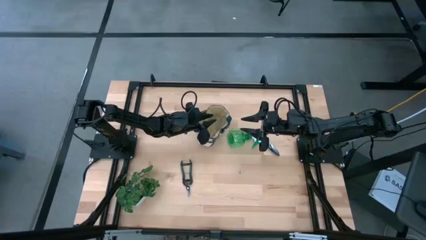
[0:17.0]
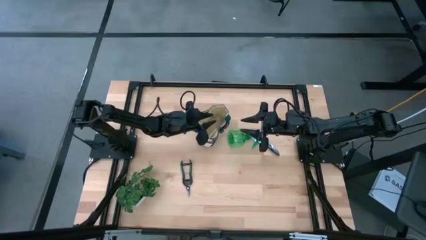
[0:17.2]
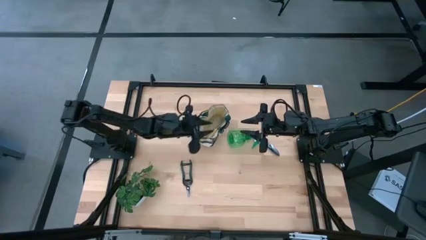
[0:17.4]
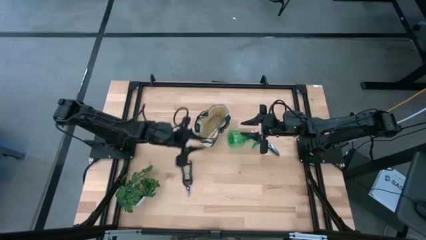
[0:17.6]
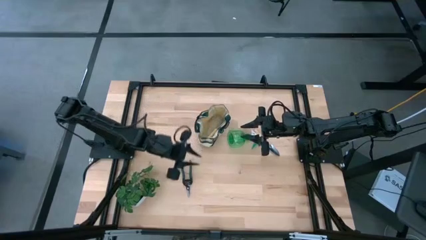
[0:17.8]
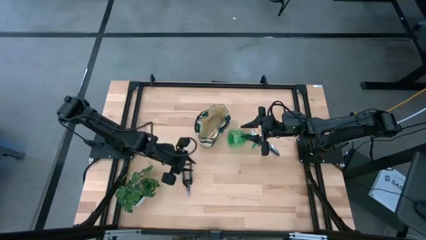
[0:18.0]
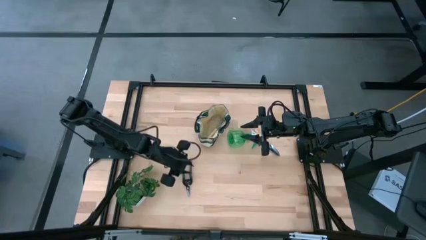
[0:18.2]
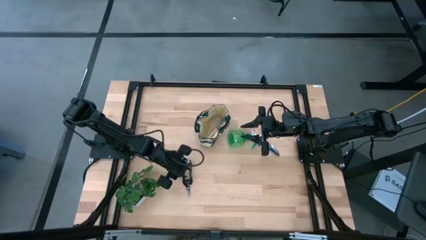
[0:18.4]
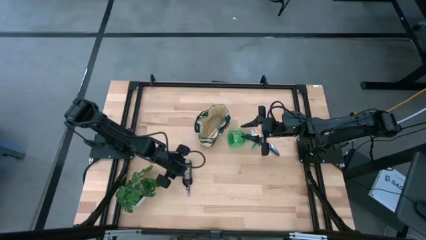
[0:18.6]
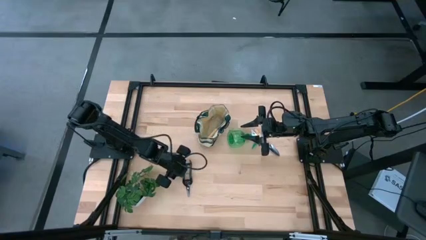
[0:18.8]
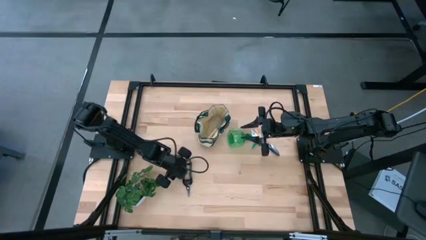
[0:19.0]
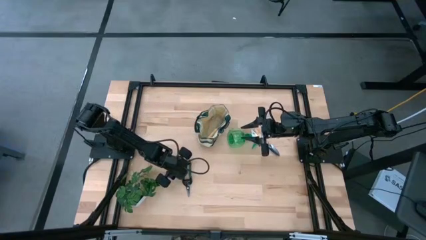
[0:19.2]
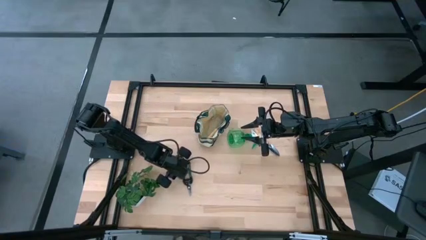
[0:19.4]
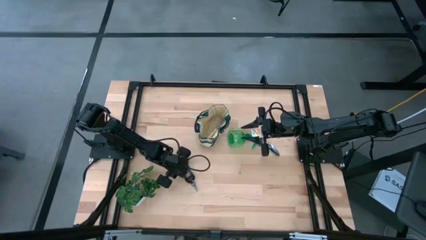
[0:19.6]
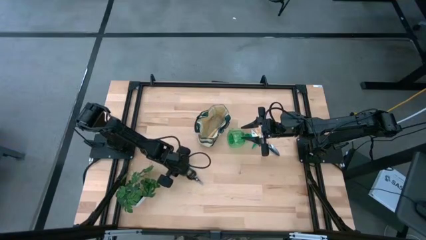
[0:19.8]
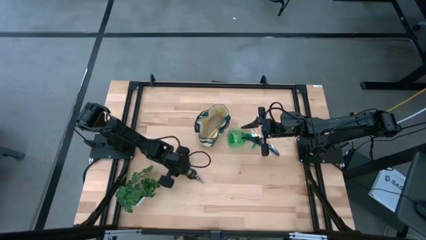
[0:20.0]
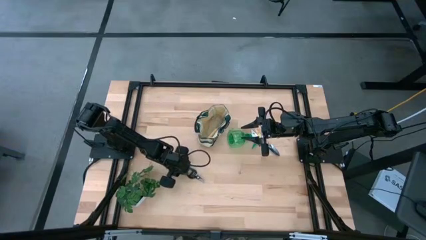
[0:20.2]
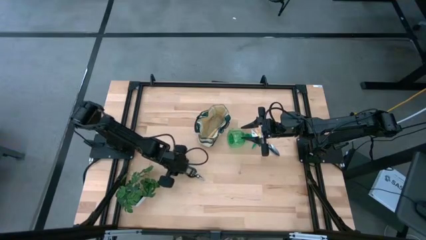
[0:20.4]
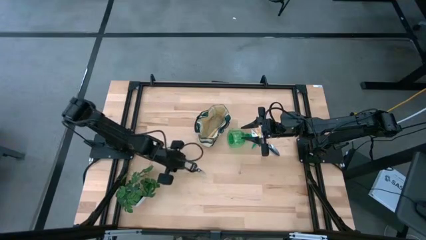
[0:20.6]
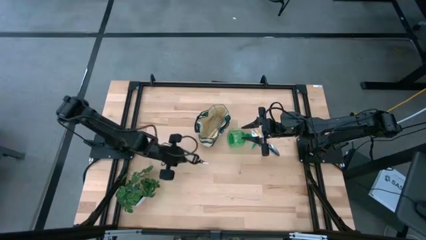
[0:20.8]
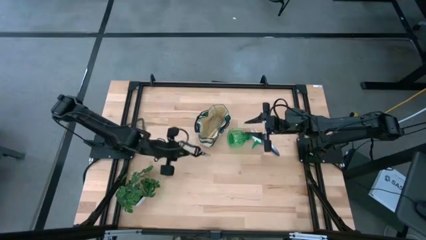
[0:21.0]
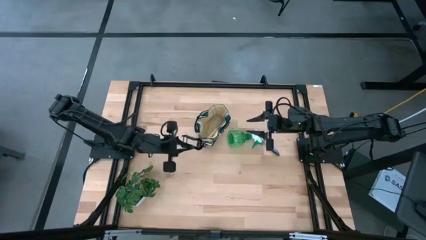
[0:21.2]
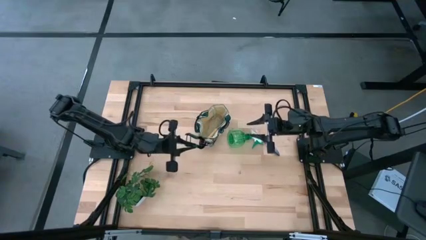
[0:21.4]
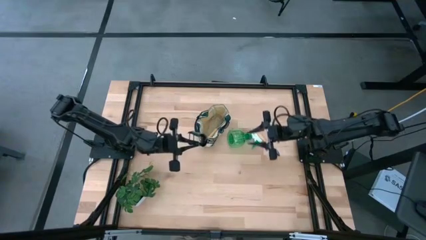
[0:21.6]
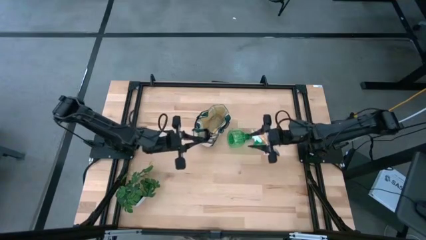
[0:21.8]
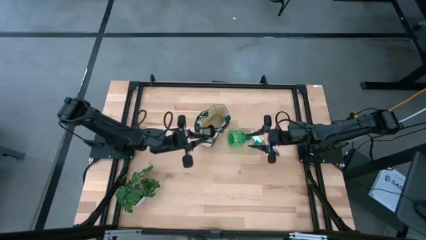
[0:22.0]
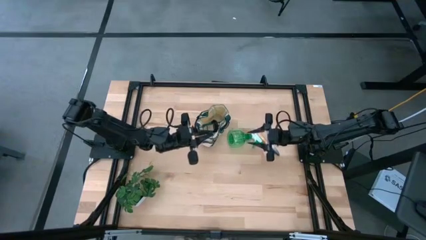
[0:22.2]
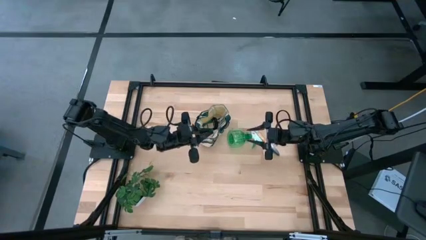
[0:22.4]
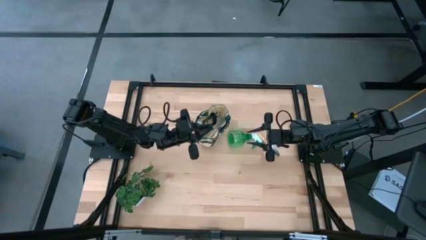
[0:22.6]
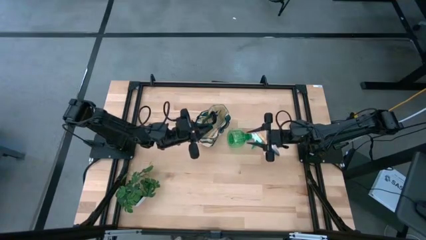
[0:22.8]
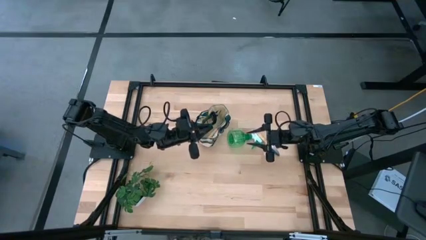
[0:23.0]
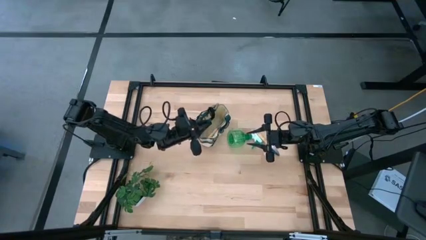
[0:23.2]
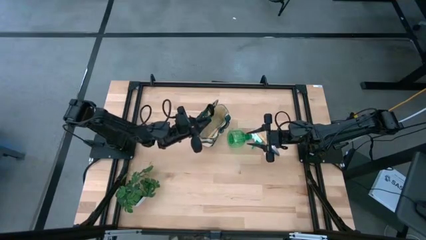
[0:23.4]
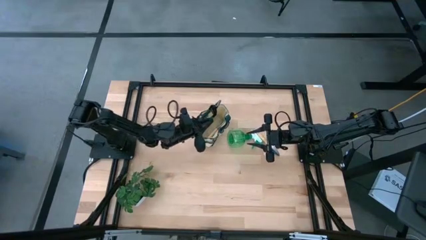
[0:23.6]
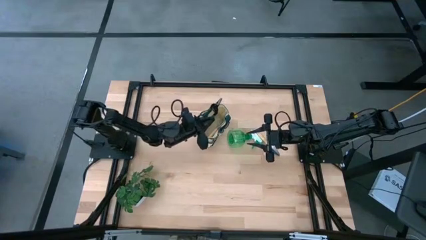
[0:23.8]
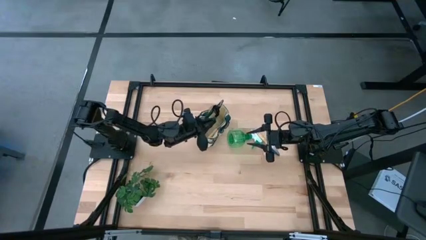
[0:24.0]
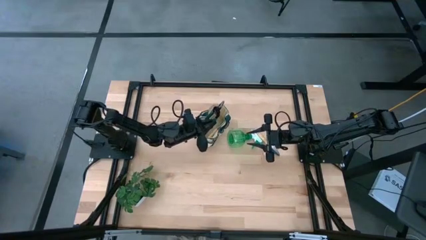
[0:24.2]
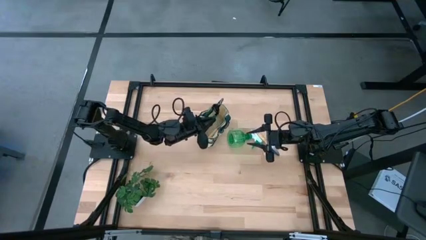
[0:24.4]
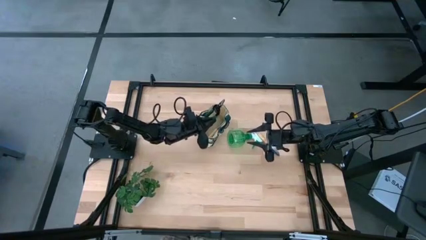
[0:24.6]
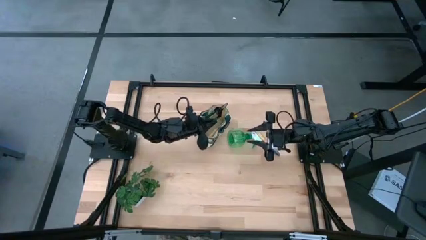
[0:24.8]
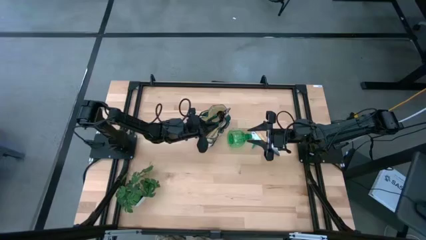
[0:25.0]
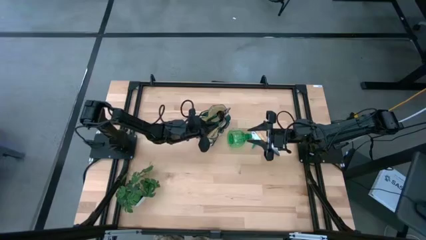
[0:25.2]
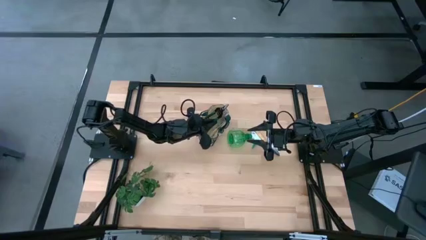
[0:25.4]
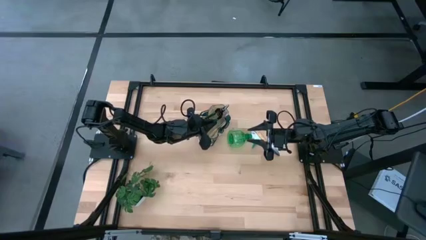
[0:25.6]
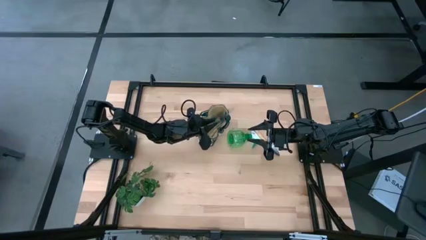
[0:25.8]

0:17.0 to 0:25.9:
Task: Pick & Place Garden tools in Gardening bag
Put the green shear scissor into the light brown gardening bag

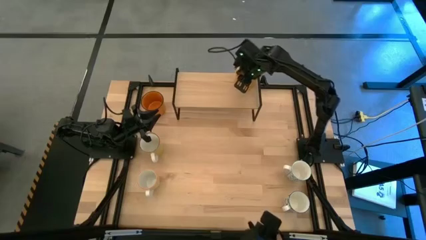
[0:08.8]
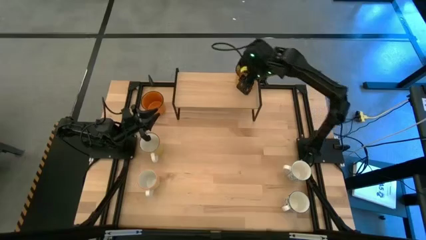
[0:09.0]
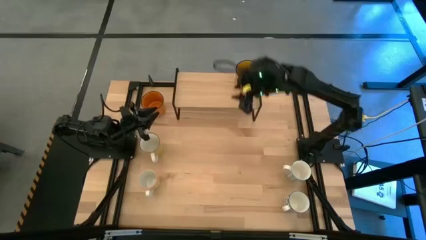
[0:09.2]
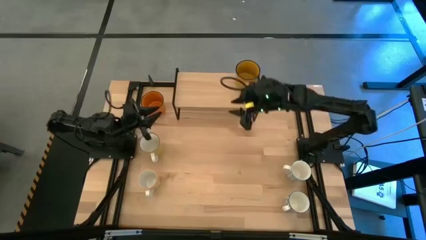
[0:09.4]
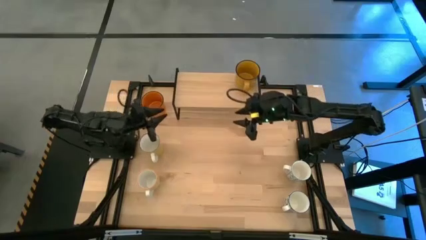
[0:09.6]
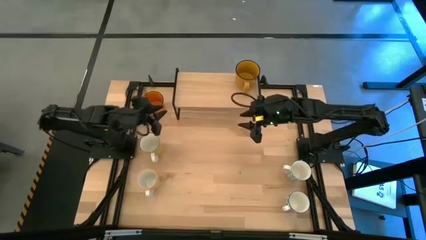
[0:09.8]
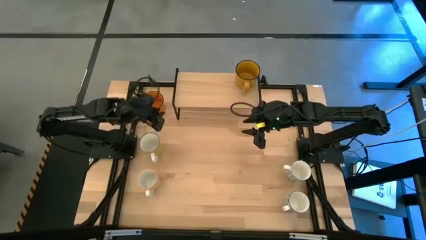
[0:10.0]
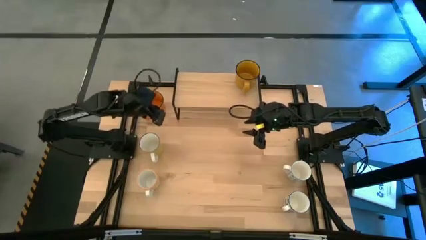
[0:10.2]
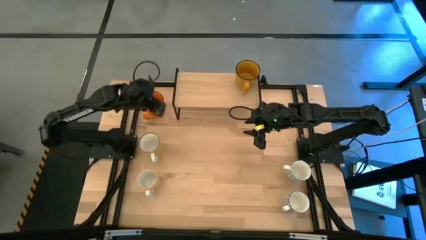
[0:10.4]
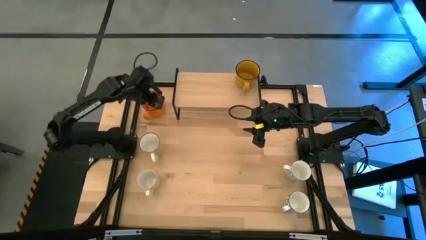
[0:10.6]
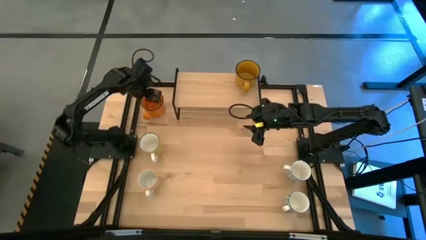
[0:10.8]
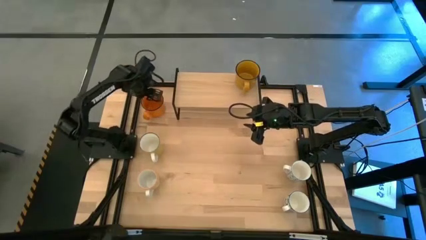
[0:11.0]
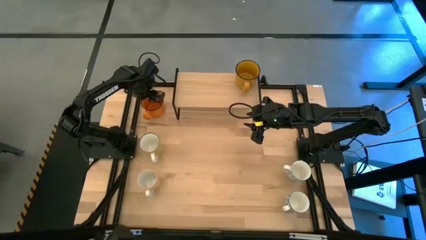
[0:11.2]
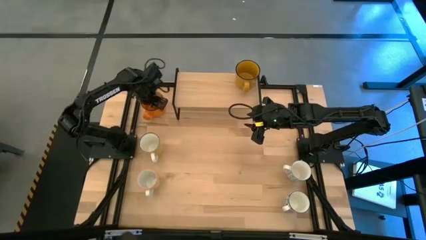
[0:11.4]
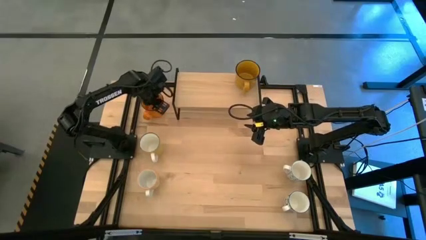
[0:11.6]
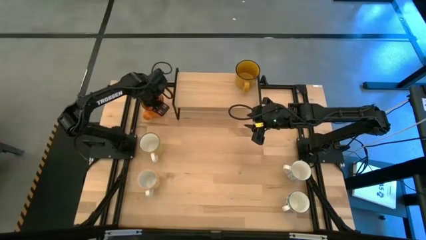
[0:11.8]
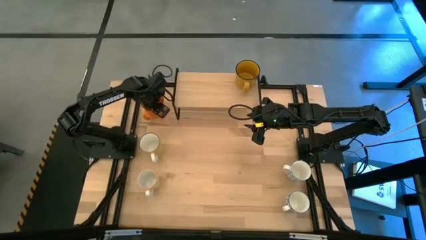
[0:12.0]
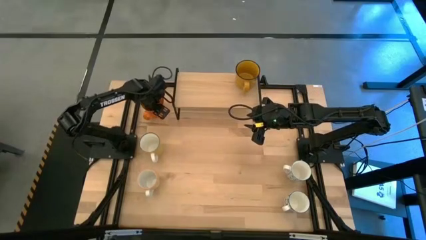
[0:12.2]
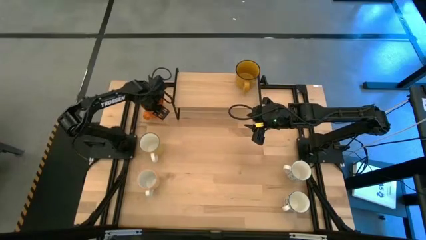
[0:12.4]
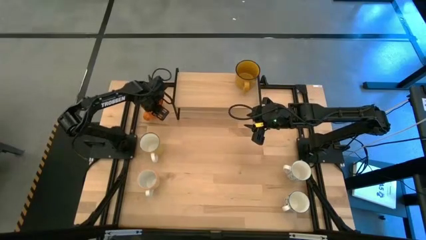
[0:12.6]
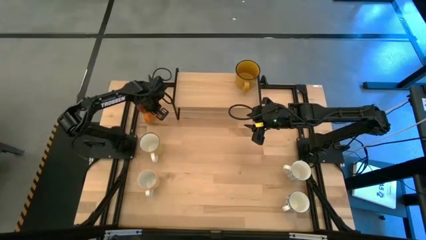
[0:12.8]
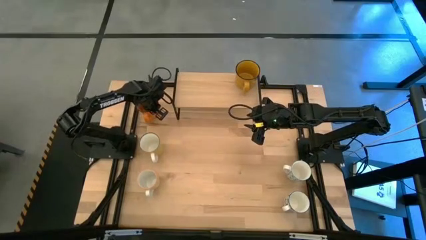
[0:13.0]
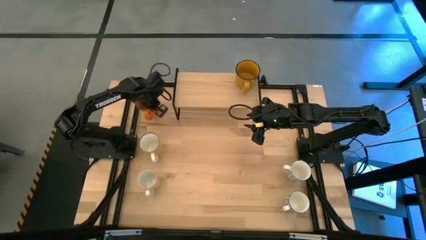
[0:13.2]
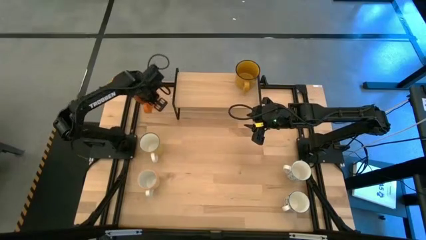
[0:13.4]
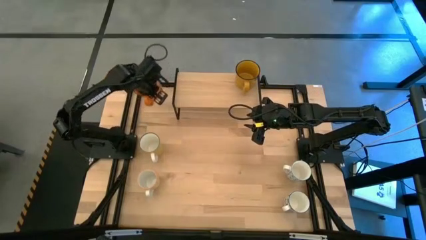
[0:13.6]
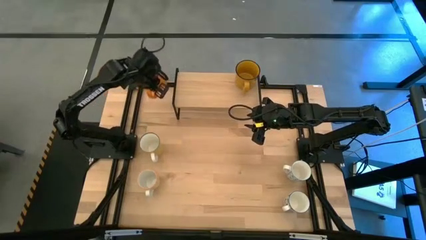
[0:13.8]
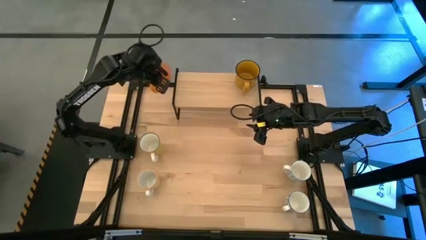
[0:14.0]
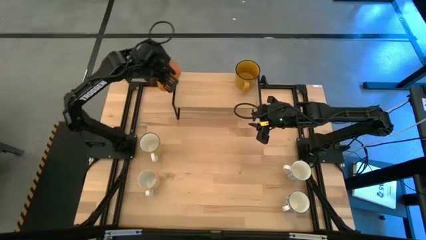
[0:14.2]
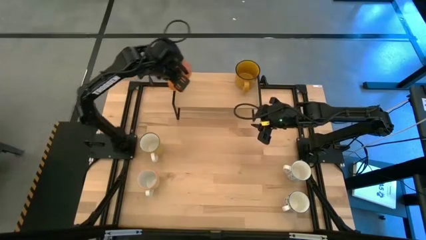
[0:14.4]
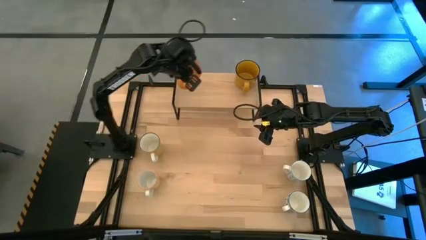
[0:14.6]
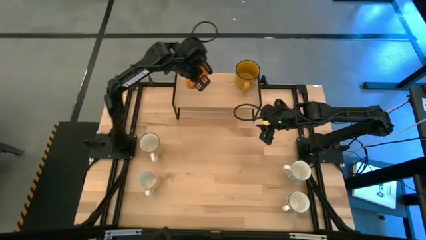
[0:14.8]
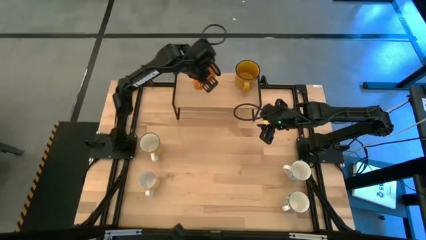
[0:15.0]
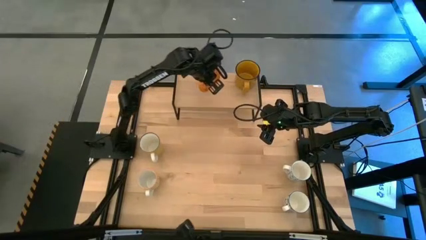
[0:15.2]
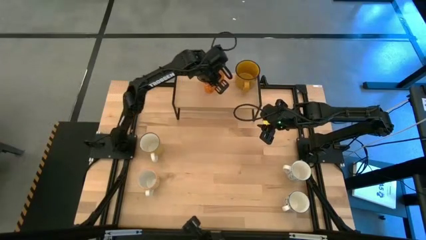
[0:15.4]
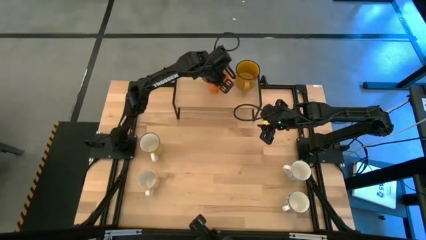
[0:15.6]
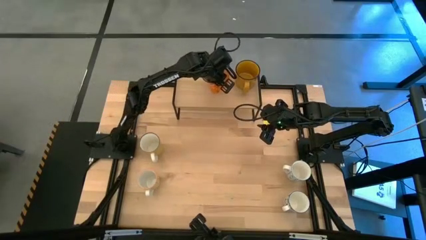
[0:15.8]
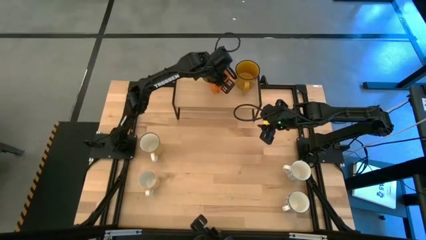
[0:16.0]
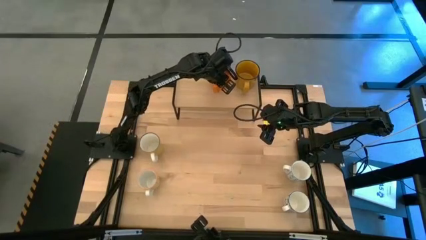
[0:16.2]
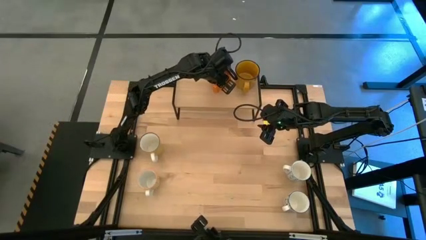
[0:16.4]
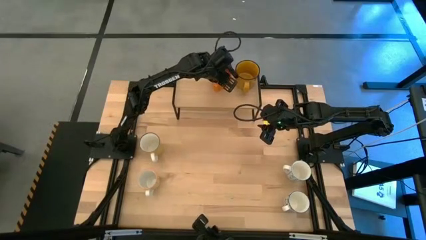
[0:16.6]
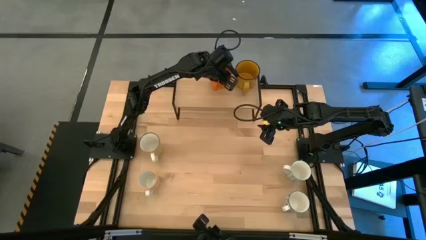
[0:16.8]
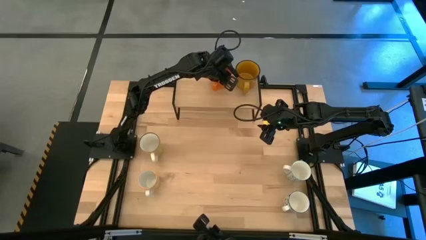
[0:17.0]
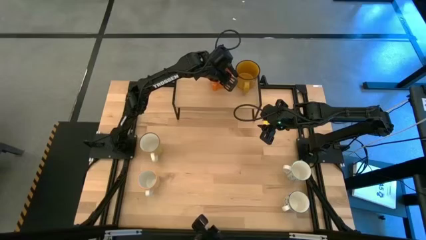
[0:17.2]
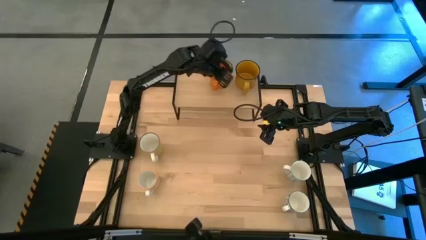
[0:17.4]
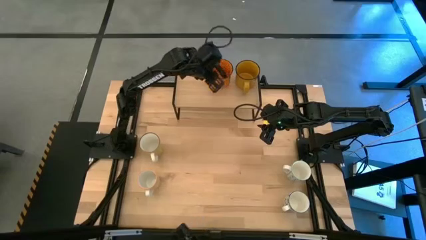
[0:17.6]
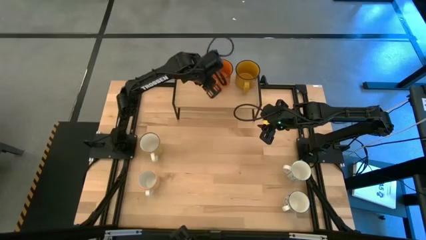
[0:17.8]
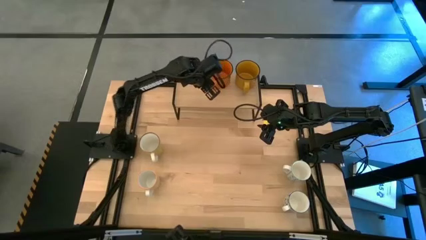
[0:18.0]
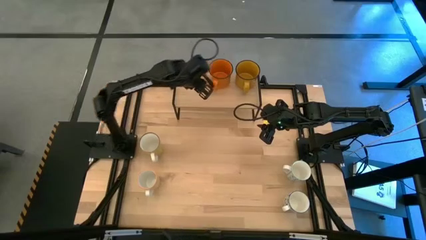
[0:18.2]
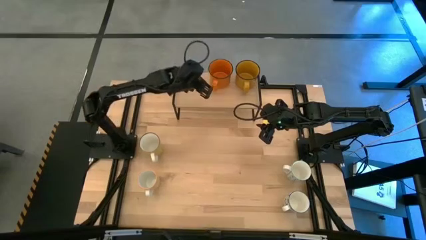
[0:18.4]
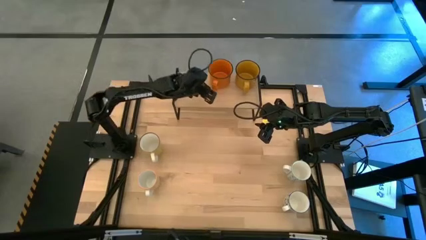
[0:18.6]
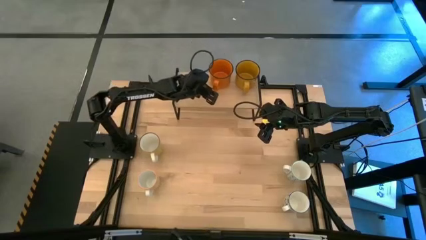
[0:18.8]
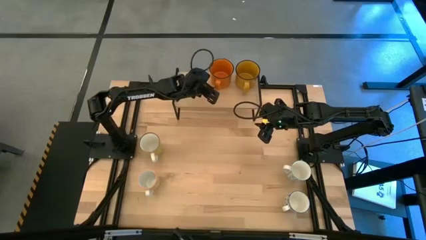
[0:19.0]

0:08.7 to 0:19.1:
Task: Place coffee mugs
Put the orange mug on the shelf
